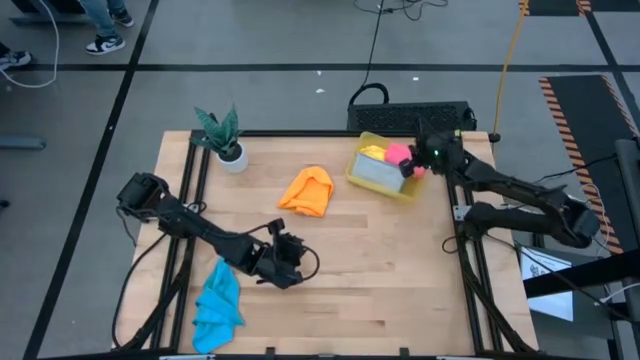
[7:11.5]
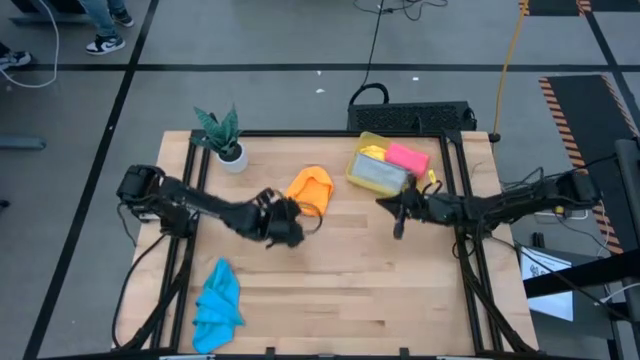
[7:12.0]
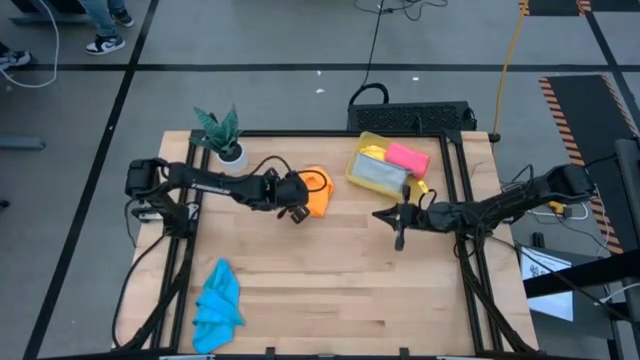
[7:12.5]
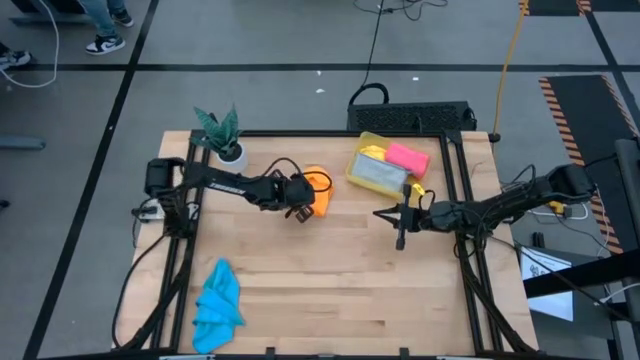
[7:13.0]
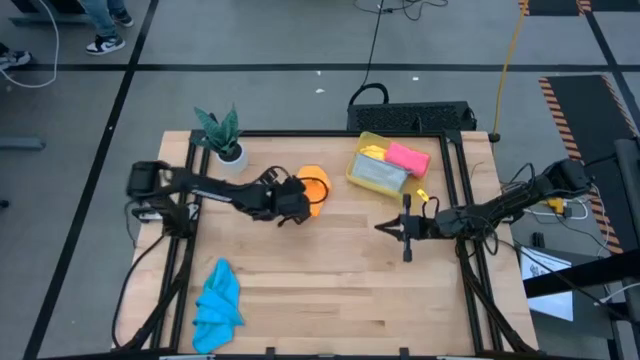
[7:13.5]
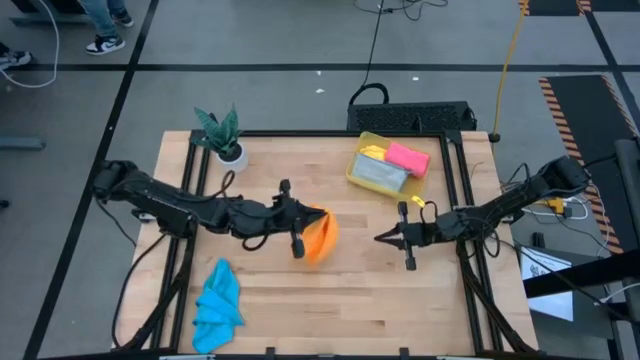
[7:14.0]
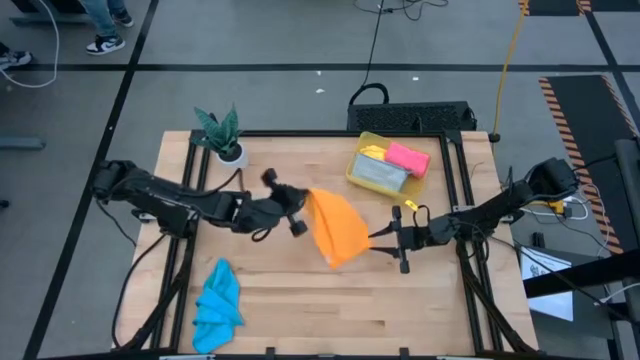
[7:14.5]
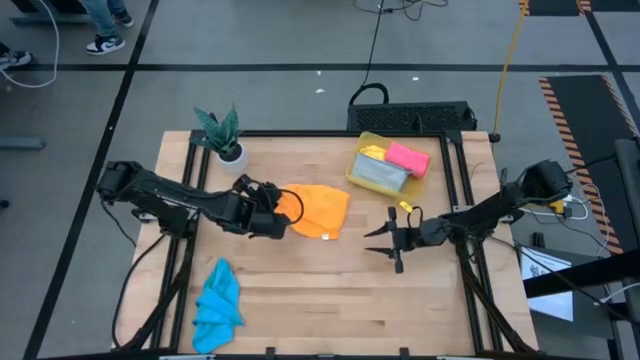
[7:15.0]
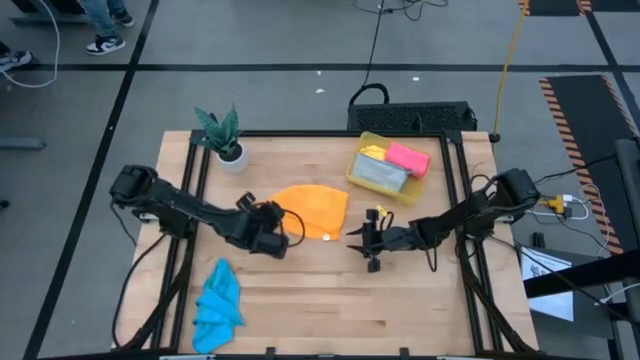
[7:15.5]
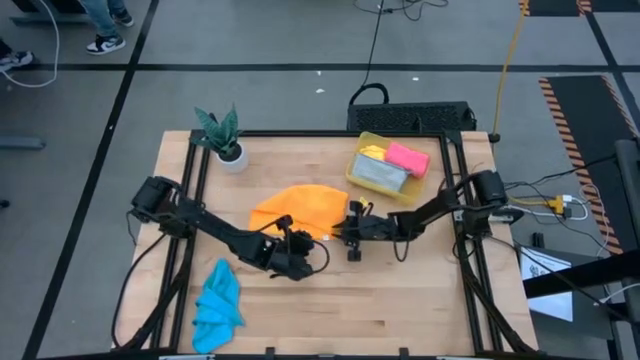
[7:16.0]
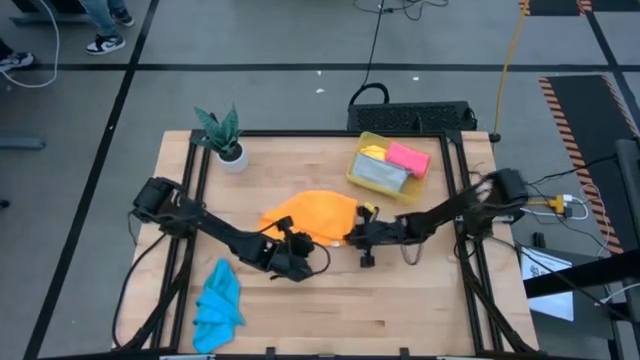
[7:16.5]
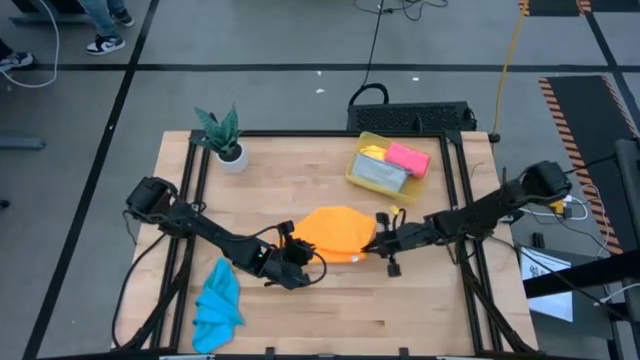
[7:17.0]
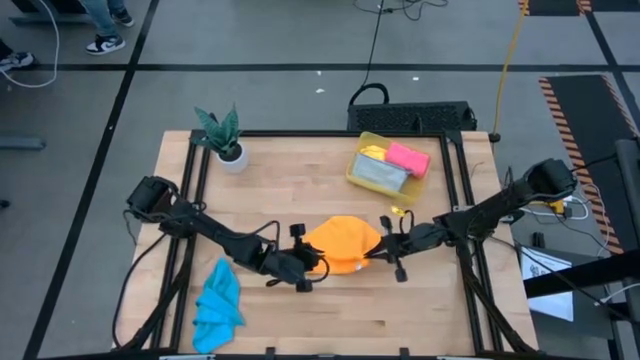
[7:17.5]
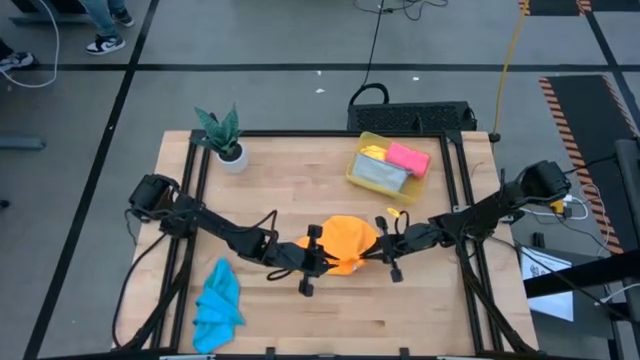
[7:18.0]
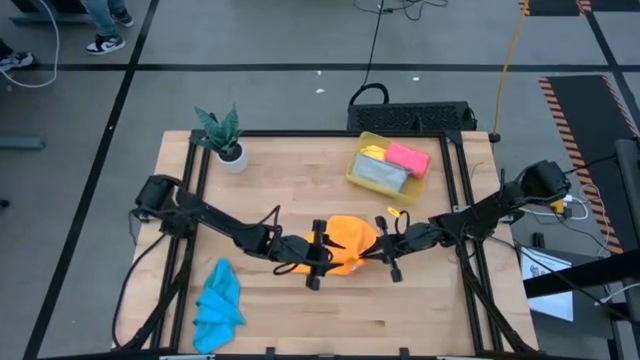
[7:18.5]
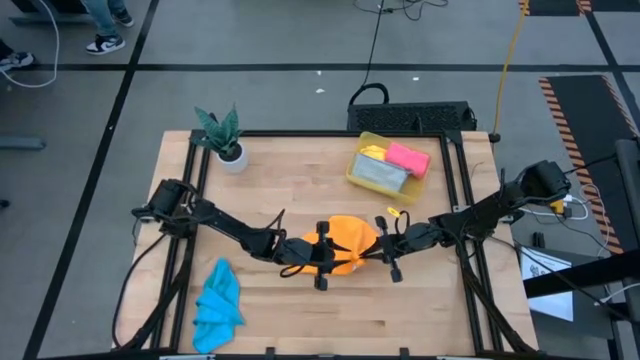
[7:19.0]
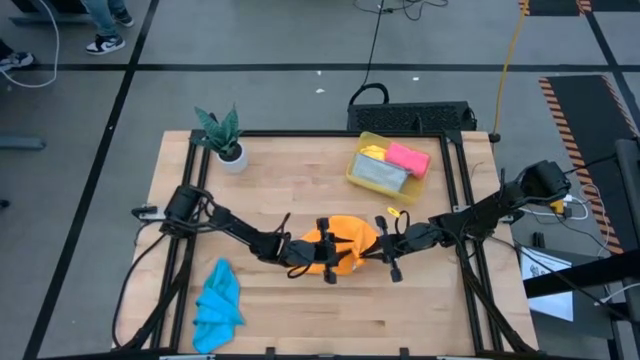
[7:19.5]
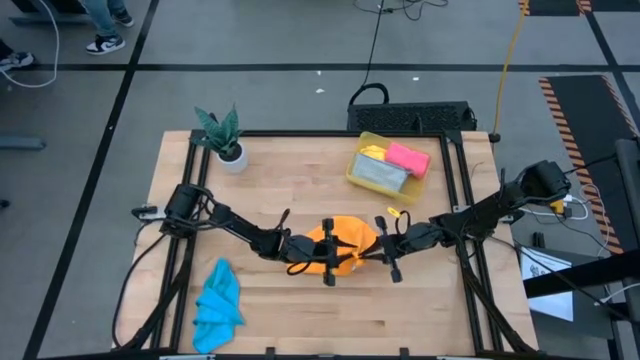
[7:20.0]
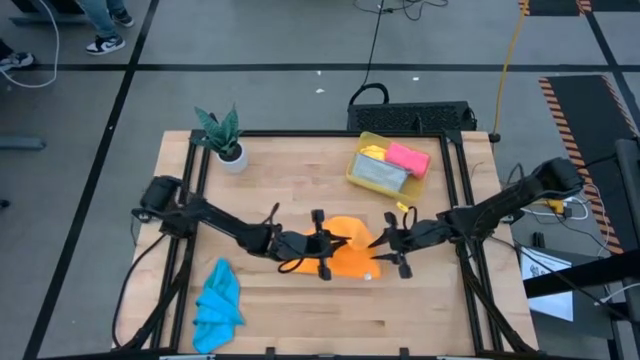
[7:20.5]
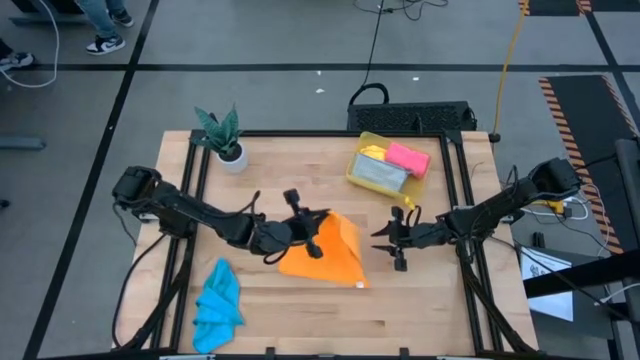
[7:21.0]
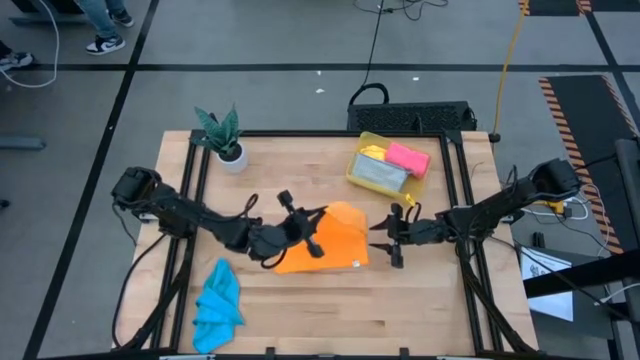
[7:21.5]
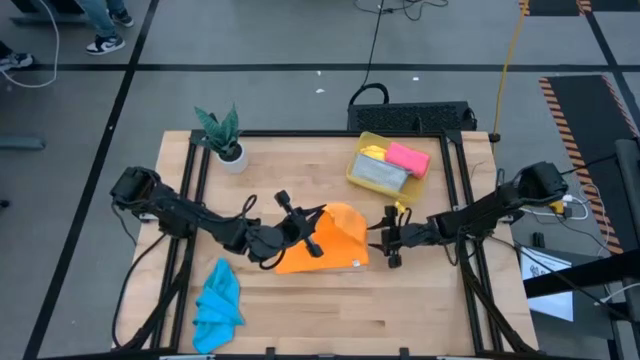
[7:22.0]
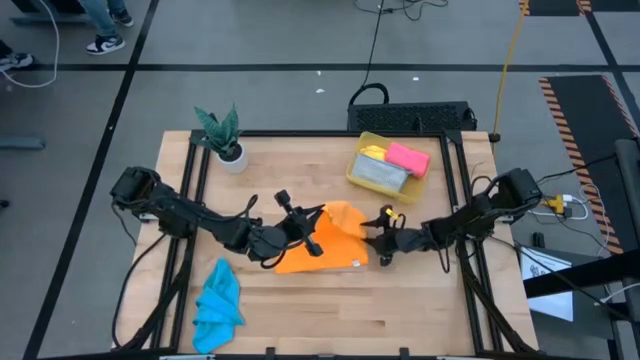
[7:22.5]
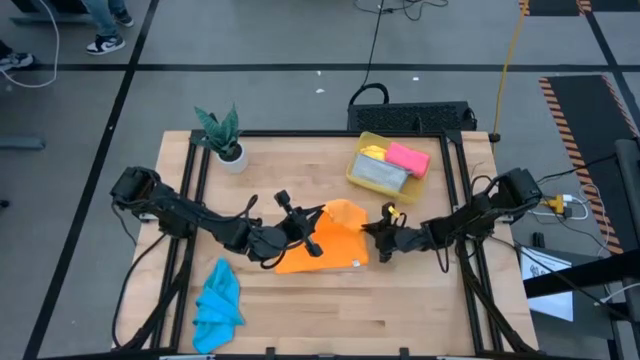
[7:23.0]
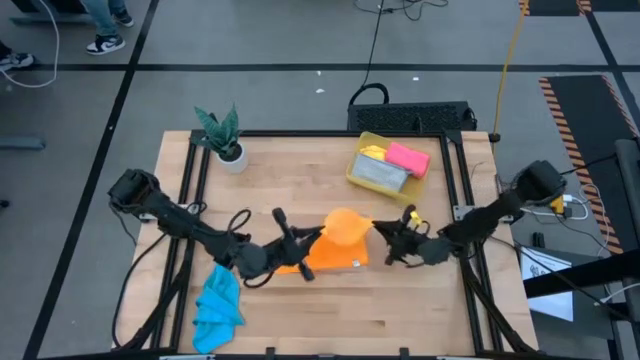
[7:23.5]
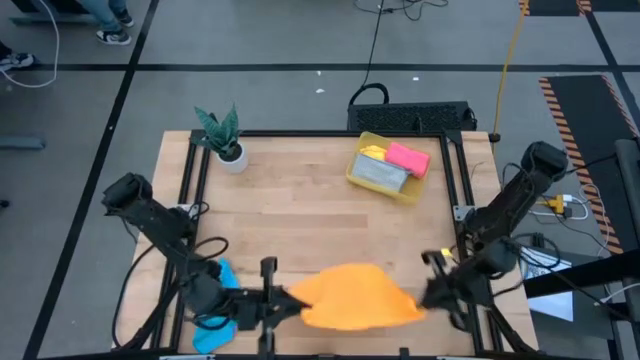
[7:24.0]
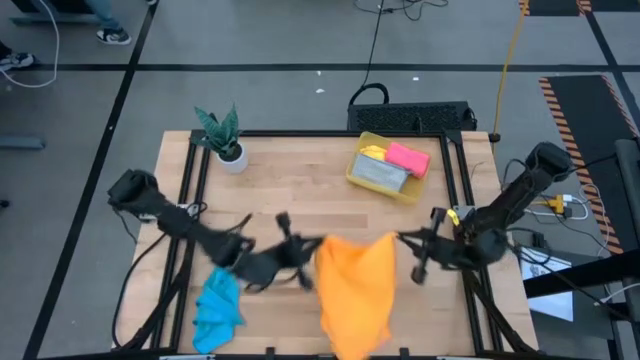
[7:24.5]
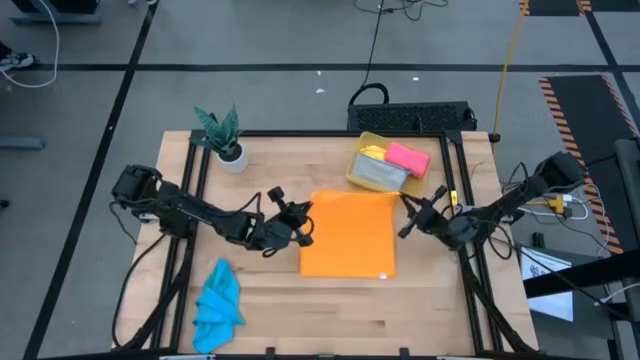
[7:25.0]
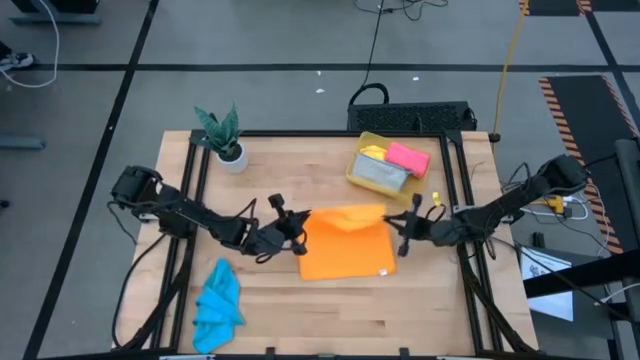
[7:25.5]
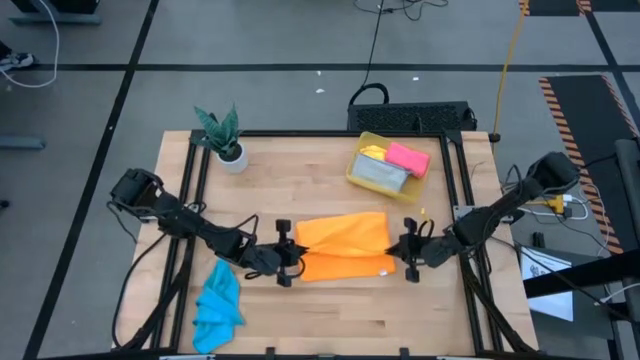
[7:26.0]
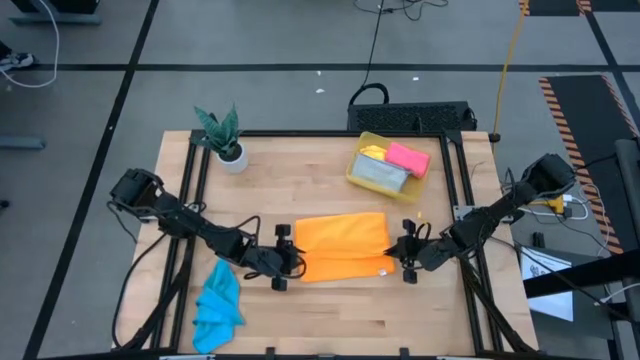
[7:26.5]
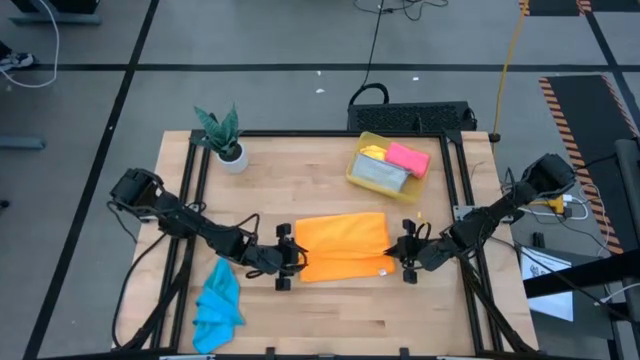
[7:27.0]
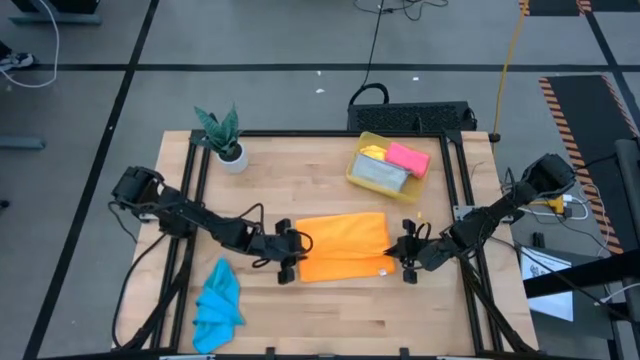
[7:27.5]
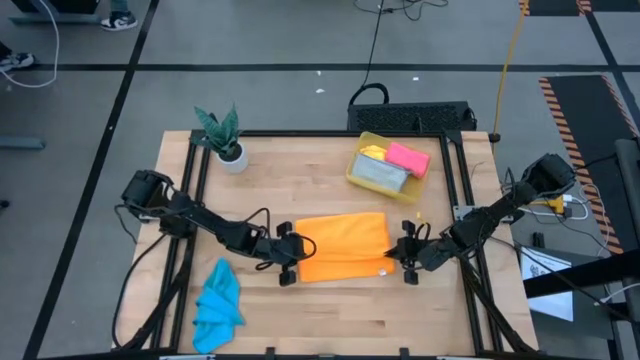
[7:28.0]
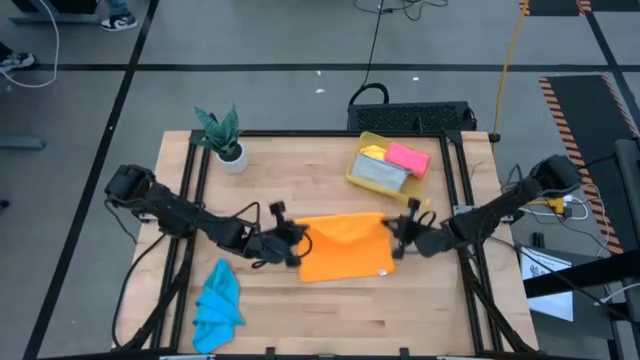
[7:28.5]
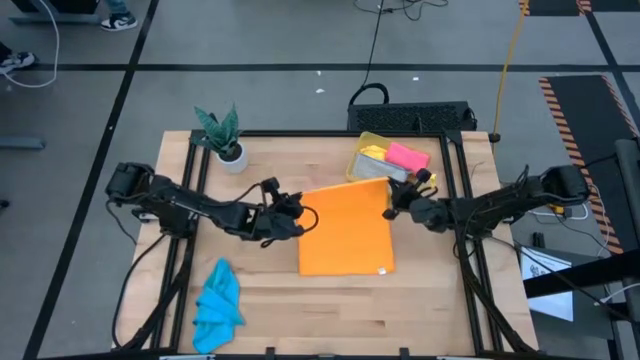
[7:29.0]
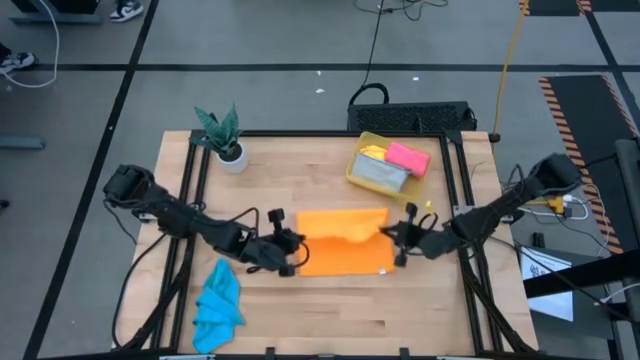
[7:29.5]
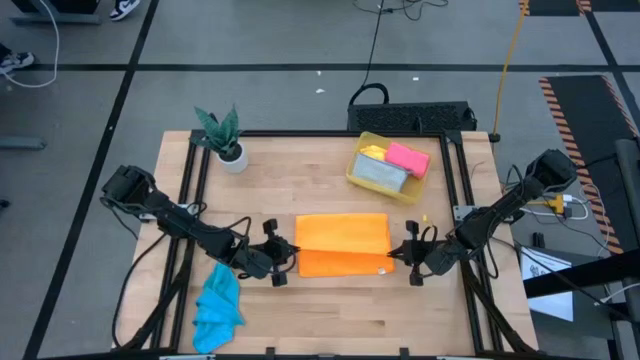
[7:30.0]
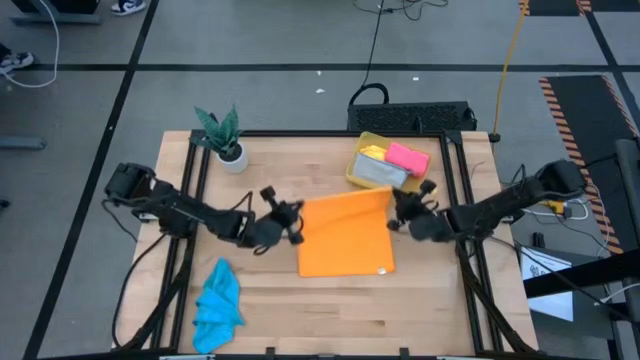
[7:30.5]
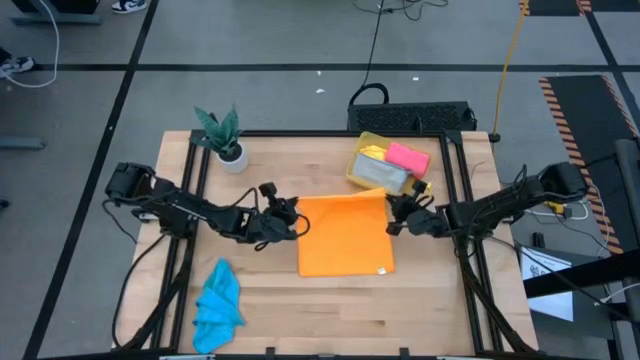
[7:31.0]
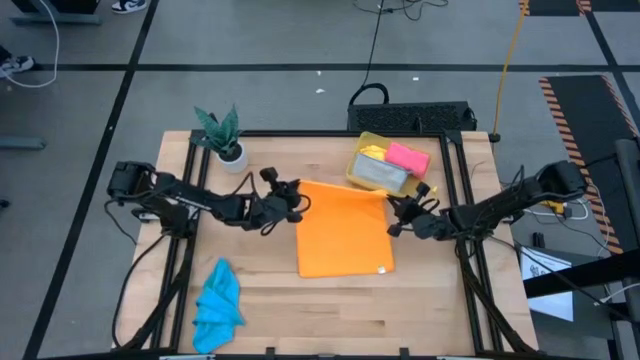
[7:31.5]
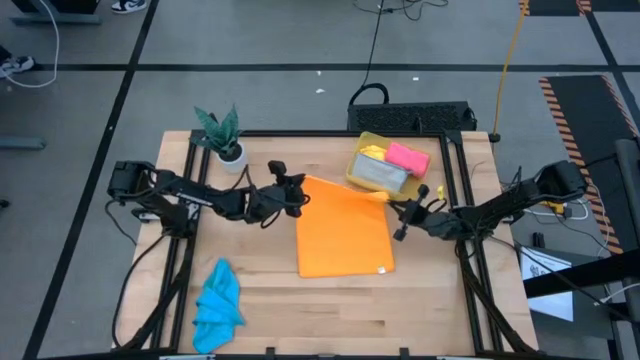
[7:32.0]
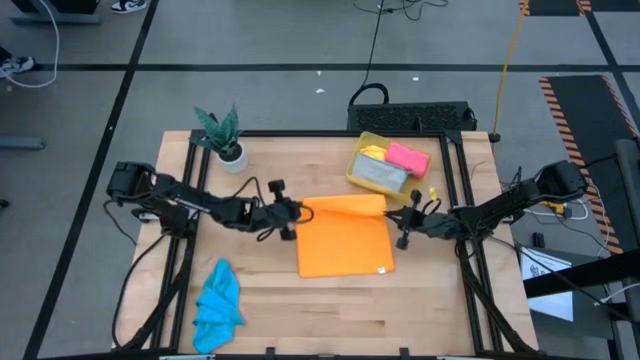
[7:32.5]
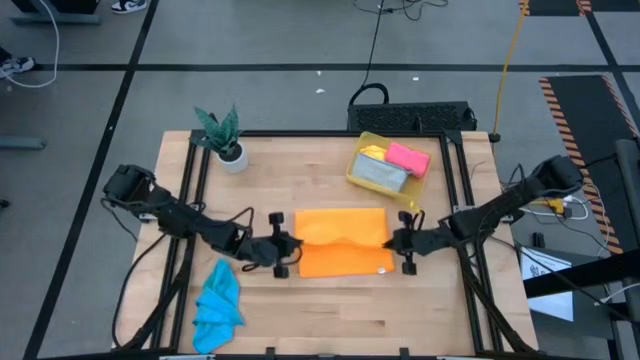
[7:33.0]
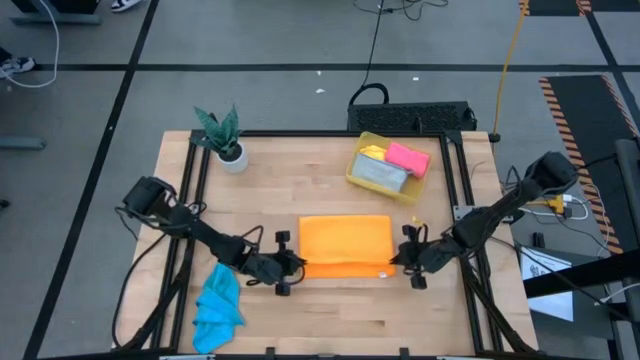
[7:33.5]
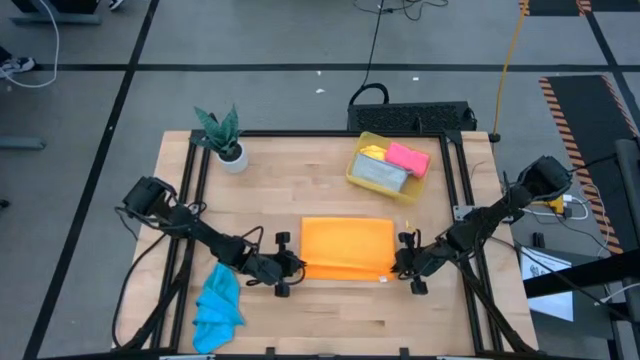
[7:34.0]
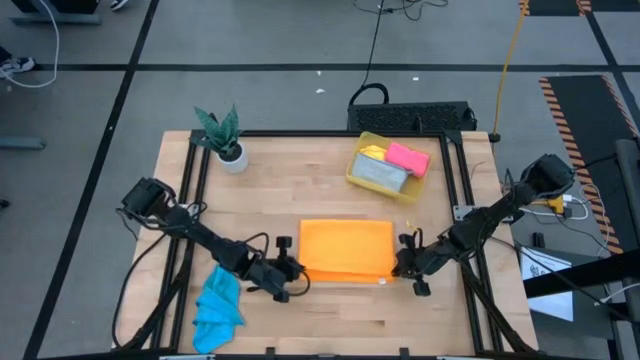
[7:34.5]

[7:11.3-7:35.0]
Task: Fold microfiber towels
Fold the orange kitchen towel
